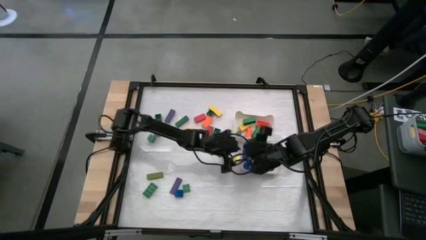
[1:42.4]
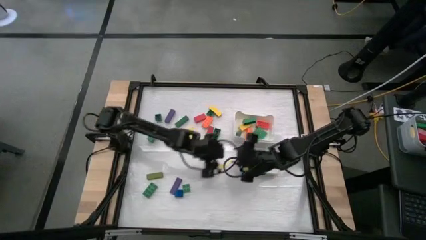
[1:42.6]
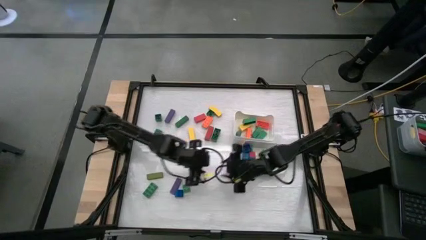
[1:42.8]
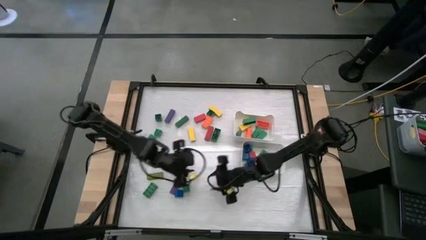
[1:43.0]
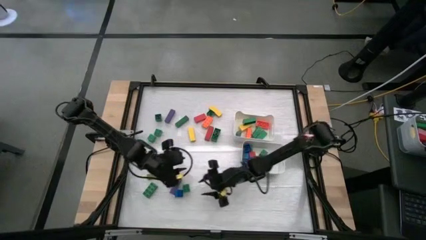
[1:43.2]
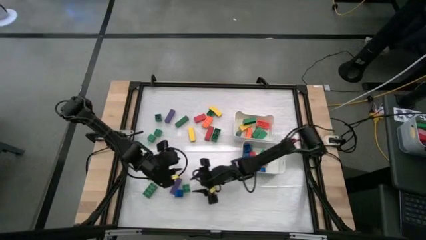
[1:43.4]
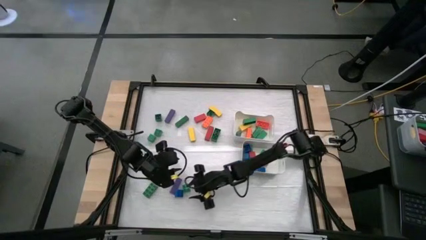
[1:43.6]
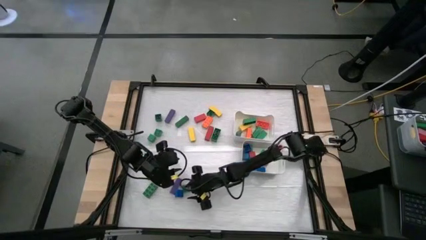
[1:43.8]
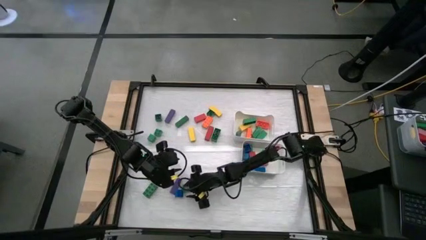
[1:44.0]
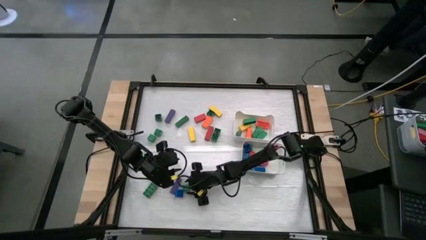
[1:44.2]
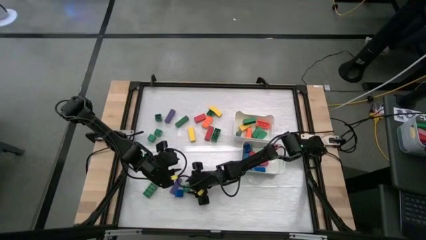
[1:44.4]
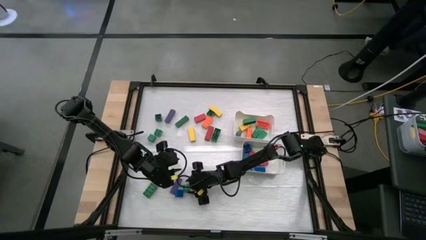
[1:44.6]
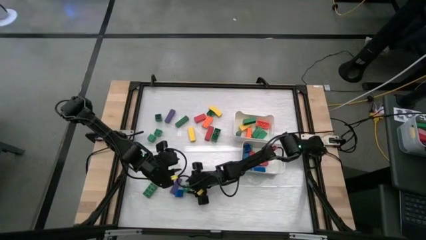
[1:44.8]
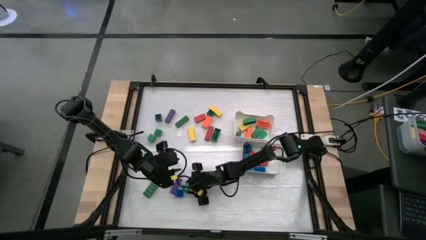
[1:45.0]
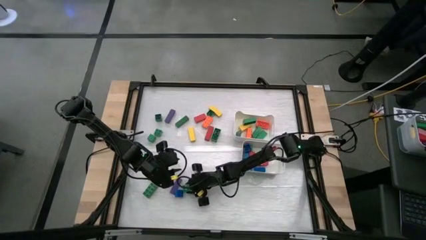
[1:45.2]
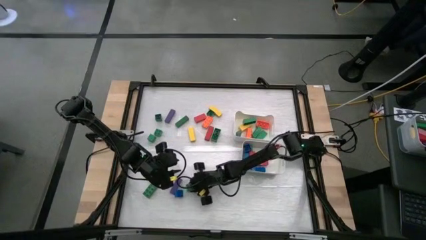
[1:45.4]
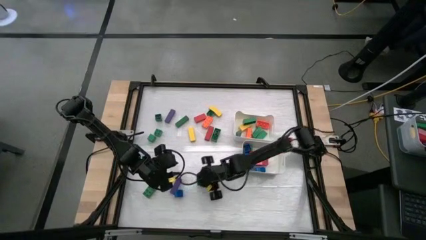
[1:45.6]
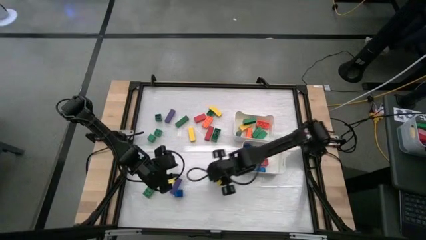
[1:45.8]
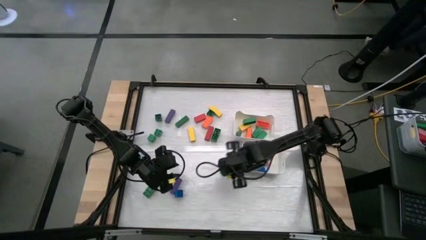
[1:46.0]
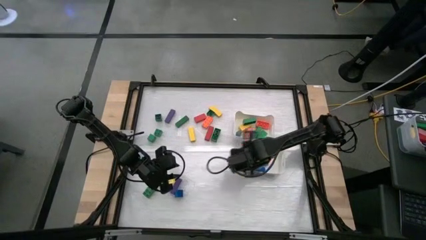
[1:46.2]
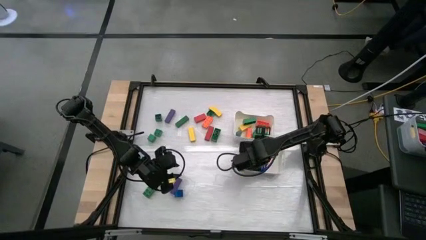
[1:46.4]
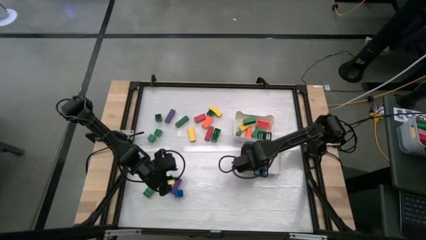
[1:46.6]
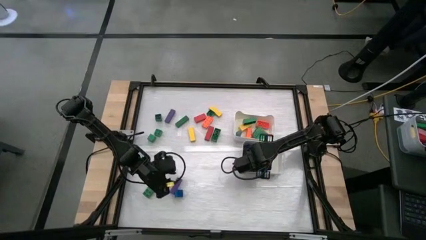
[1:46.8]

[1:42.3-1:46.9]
Task: Sort blocks by size
Put the green cube game piece into the bottom white bin

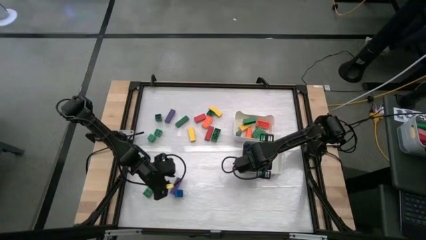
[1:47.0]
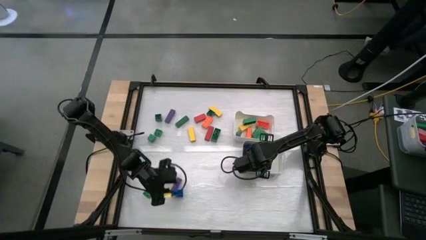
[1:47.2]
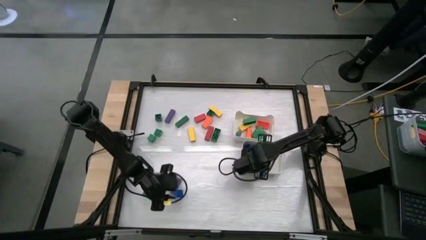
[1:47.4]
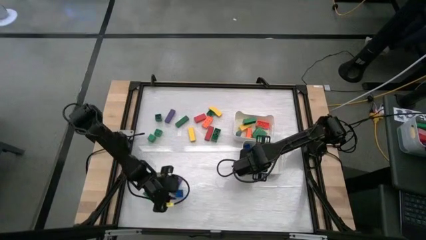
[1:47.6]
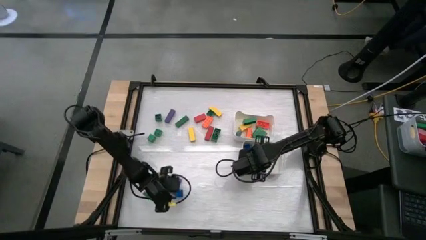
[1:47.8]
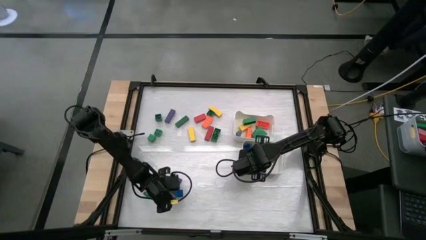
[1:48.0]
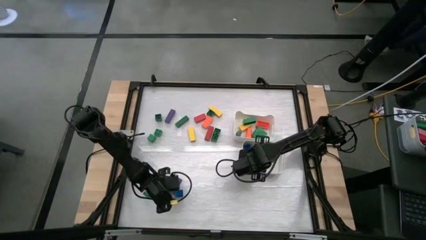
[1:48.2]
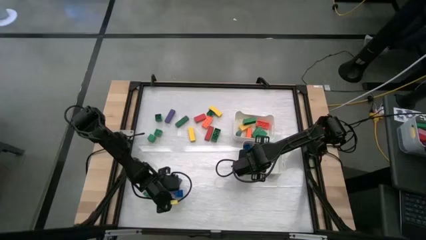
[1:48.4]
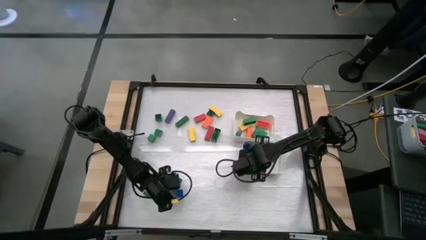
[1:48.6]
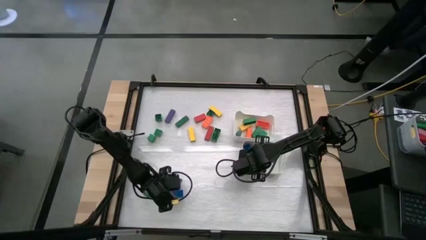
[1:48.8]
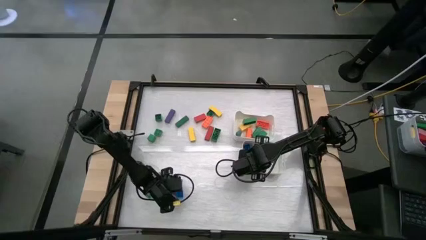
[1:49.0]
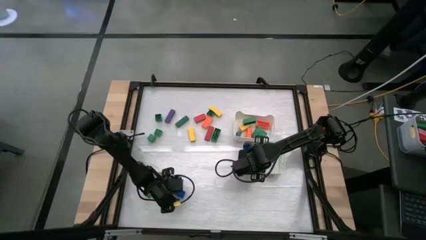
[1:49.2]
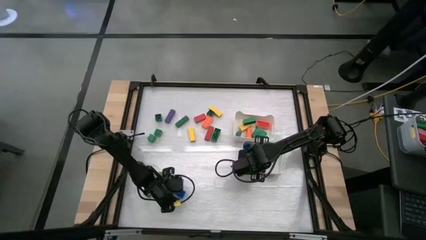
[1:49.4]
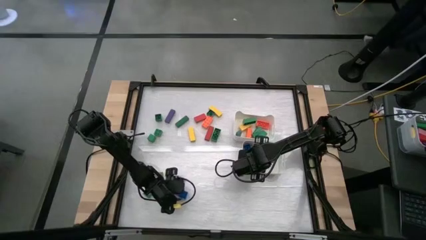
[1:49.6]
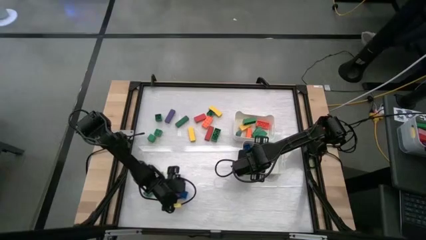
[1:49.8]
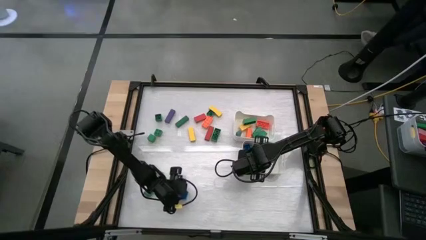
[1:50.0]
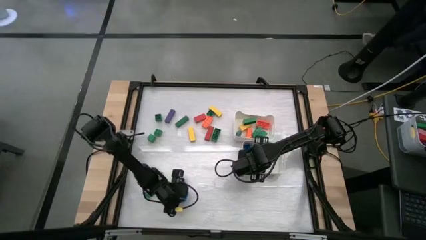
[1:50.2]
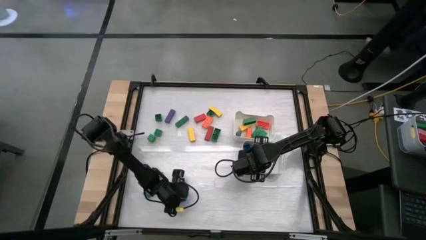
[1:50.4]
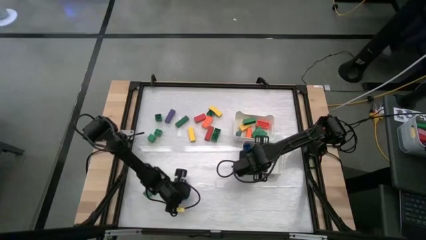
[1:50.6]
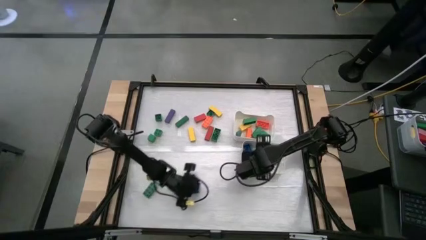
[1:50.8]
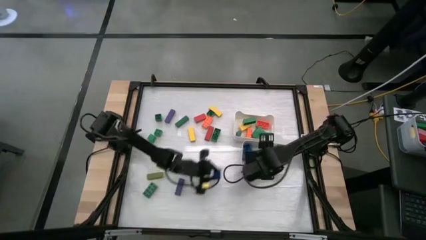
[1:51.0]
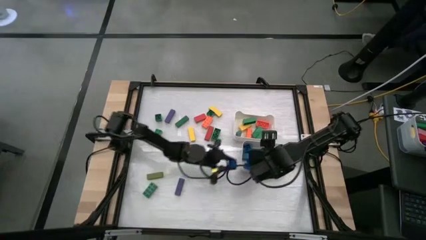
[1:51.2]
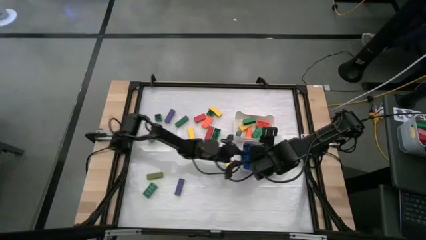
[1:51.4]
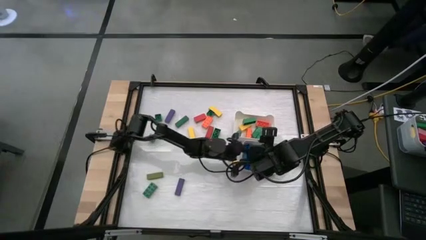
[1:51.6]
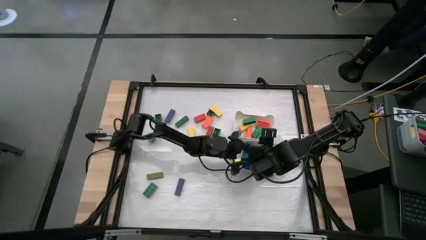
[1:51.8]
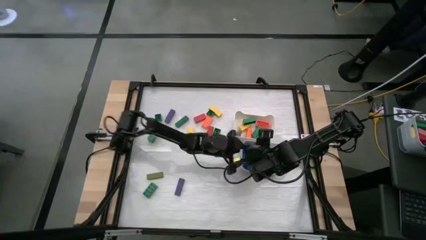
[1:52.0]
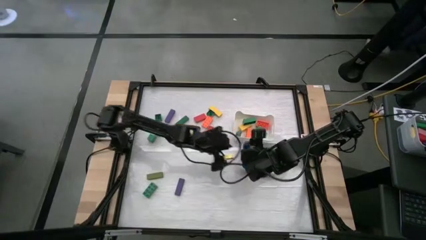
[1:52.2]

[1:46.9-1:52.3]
Put the blue cube game piece into the bottom white bin

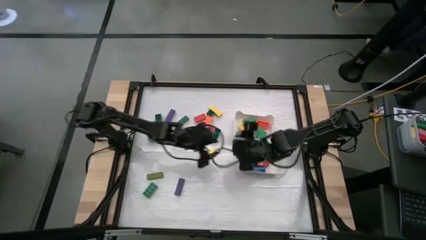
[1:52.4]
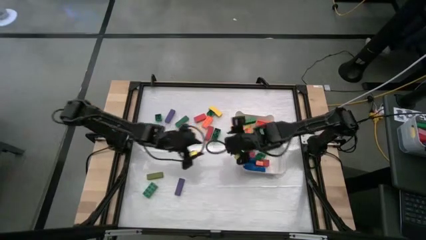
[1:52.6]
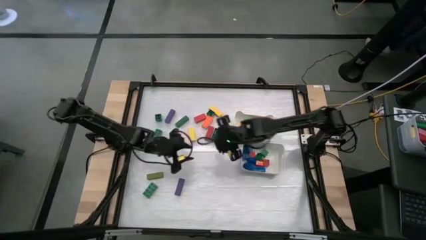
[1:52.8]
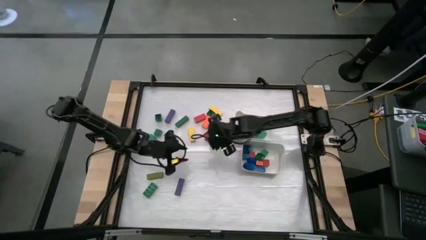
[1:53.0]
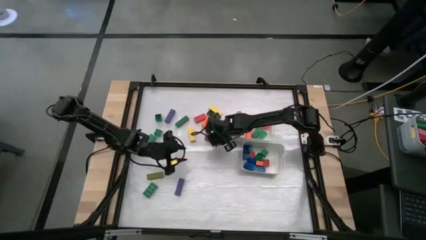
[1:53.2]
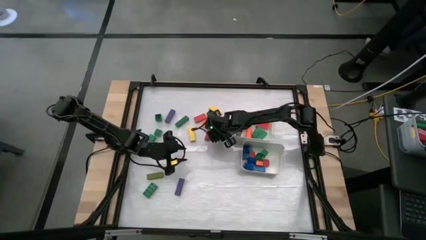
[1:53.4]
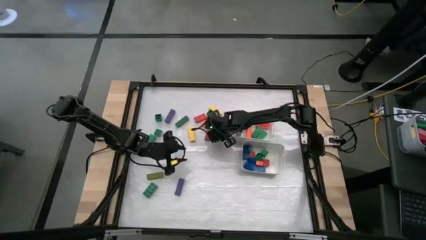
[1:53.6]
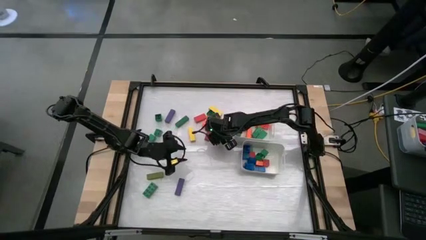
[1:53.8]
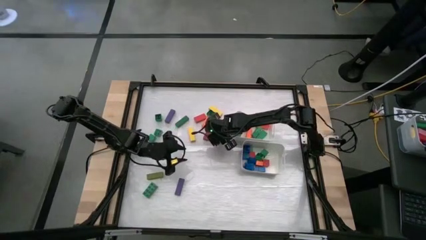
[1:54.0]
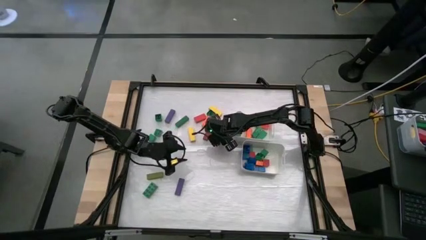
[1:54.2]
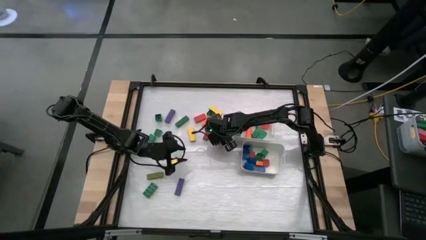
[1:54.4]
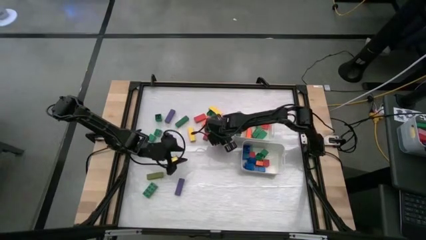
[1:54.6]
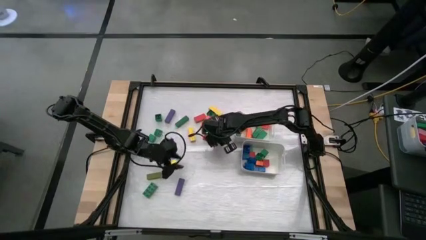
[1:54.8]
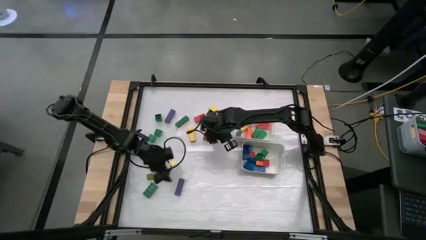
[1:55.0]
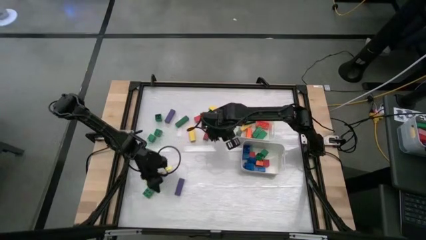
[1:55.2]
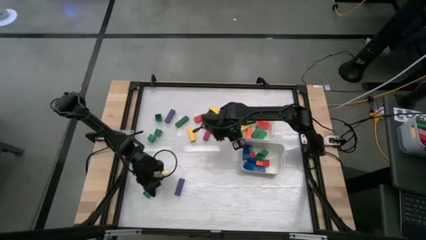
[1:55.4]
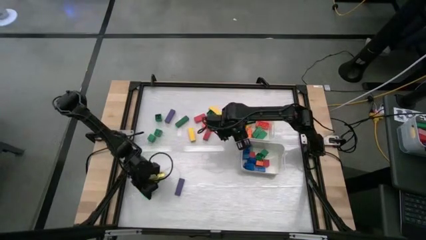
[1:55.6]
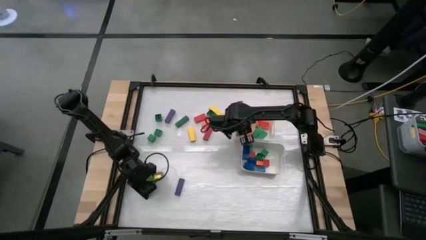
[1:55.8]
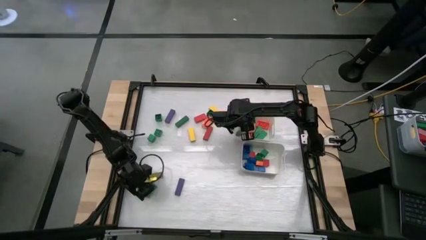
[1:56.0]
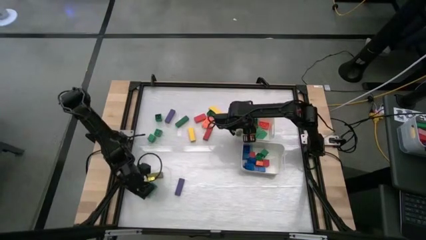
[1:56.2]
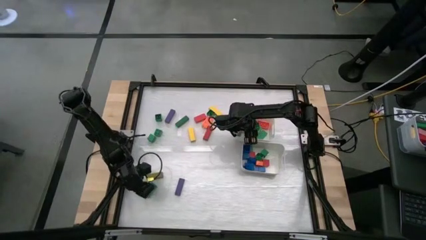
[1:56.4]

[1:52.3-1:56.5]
Put the green rectangle game piece into the top white bin

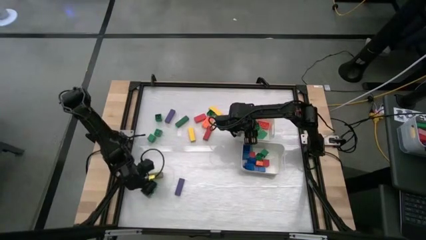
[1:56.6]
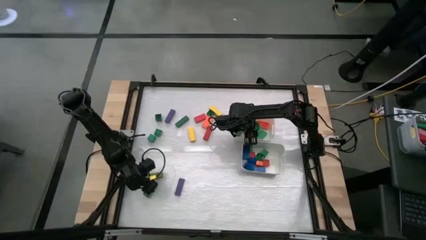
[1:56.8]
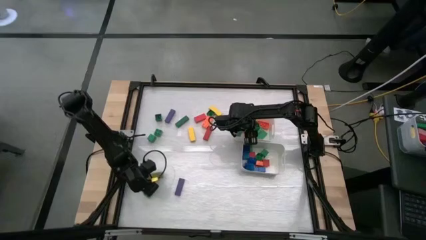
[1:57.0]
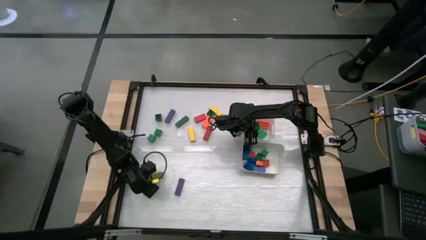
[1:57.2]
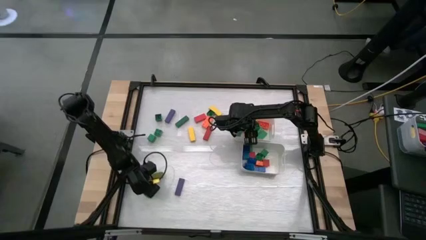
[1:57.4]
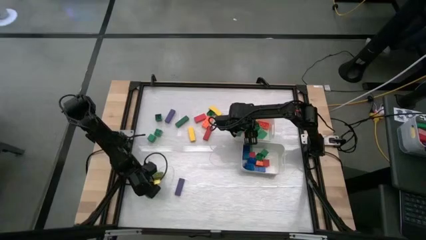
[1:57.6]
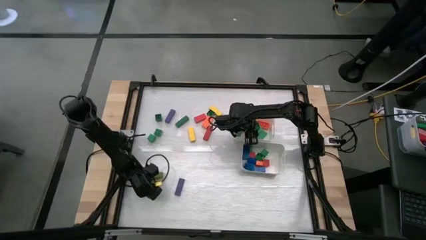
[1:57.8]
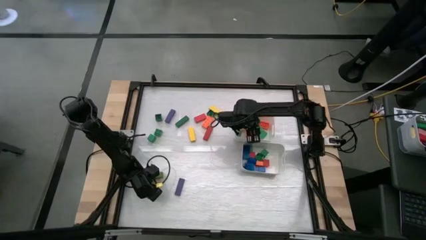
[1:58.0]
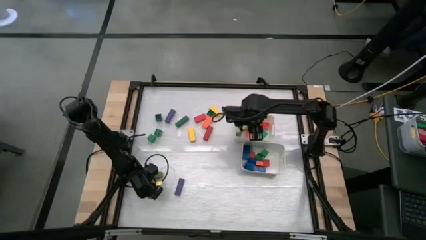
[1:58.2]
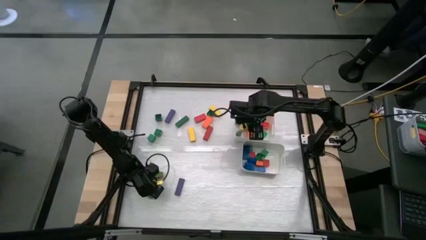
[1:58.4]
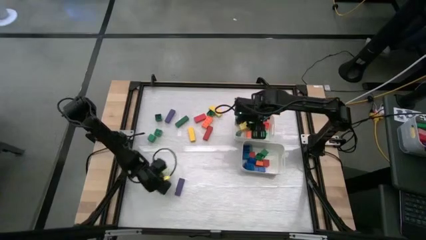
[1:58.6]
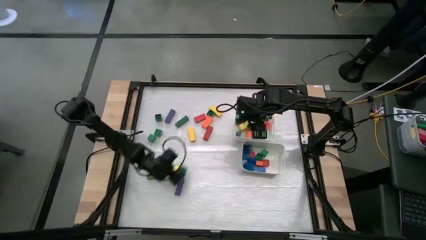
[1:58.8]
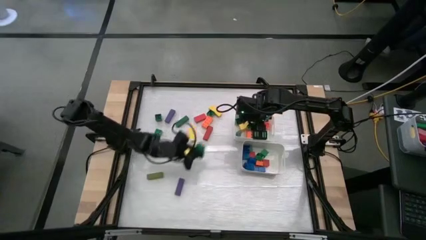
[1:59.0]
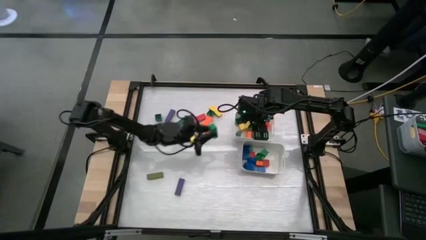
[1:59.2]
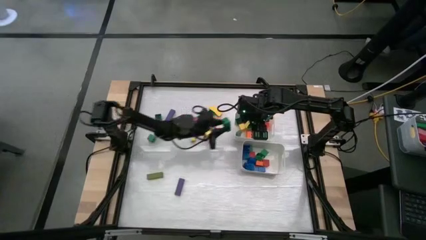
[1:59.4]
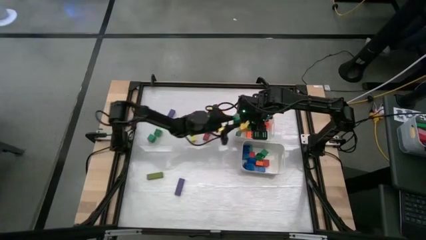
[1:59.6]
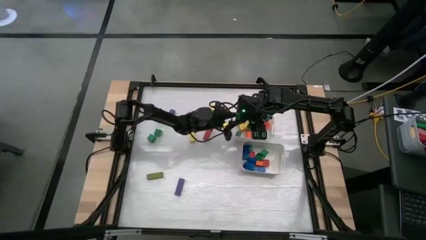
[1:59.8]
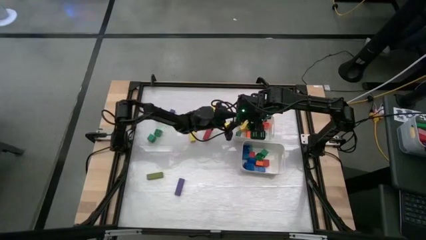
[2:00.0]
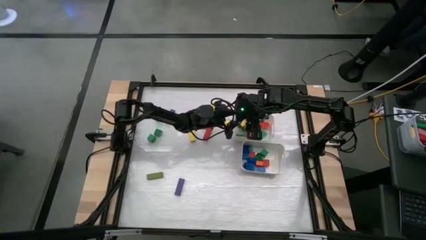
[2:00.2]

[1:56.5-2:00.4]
Put the green rectangle game piece into the top white bin
